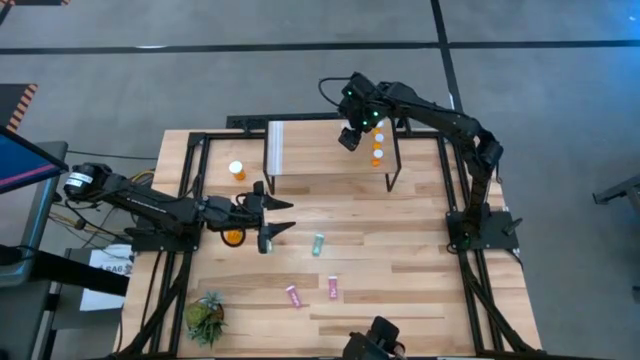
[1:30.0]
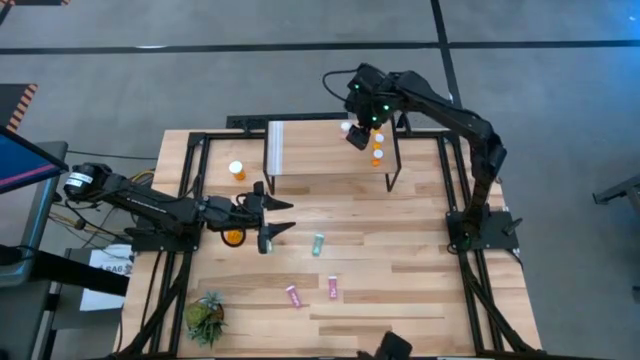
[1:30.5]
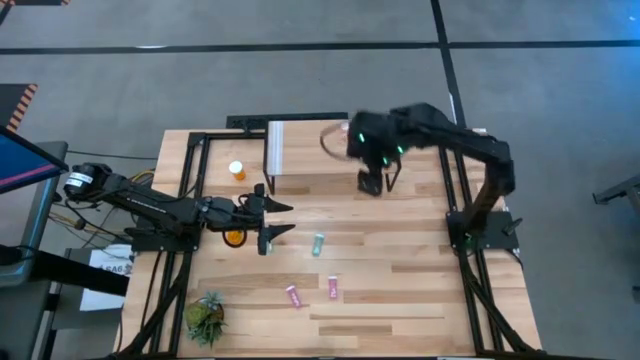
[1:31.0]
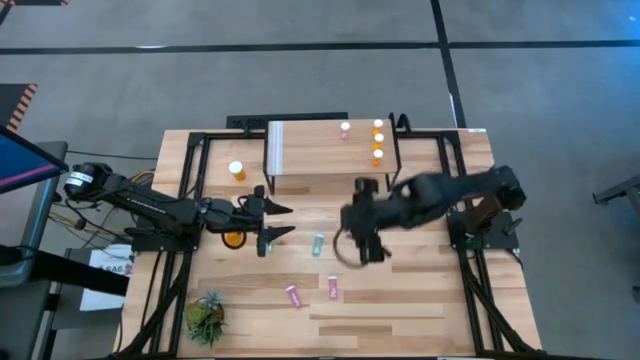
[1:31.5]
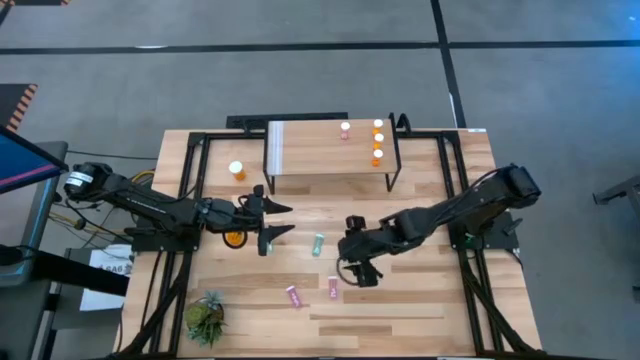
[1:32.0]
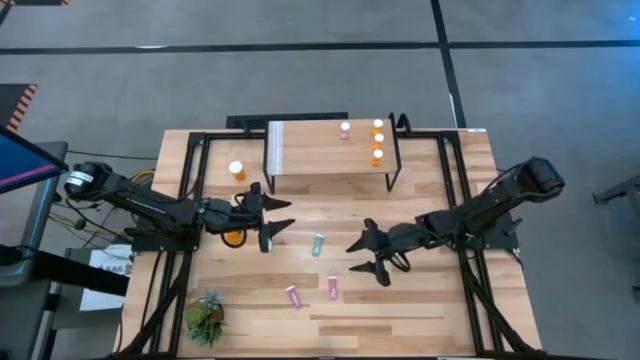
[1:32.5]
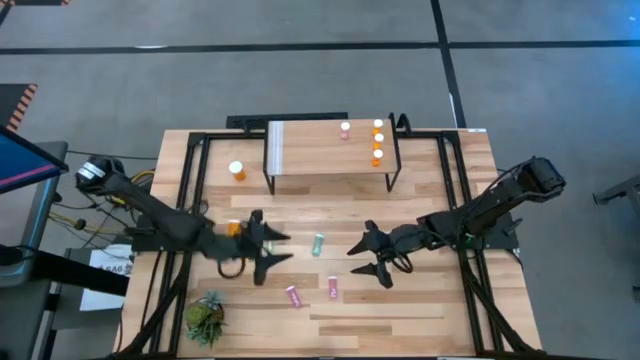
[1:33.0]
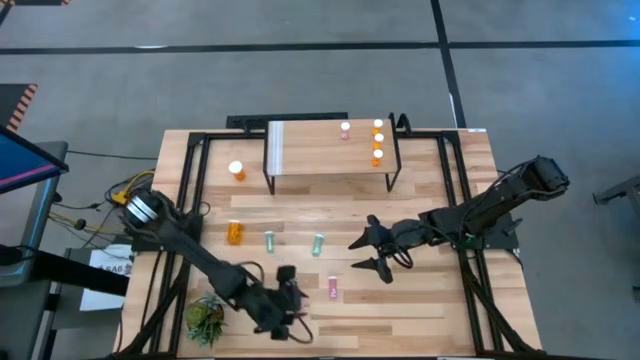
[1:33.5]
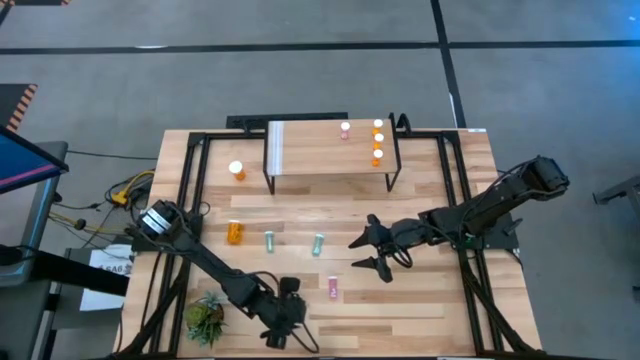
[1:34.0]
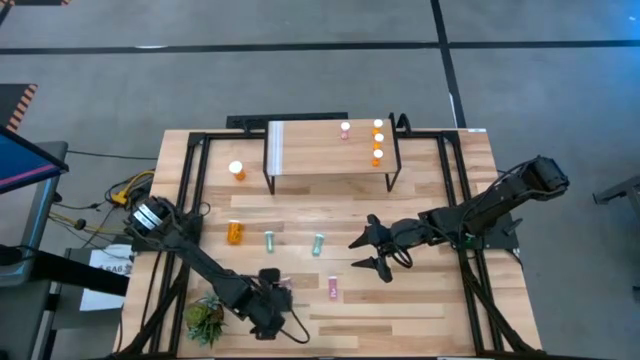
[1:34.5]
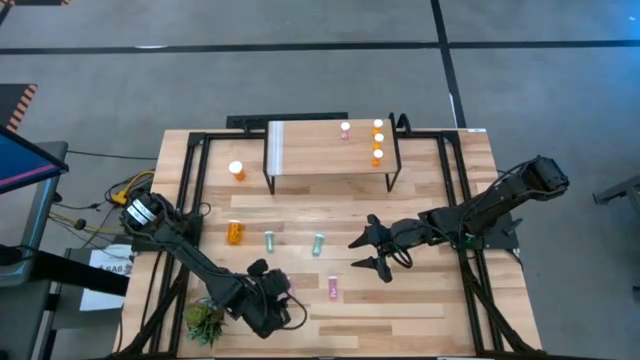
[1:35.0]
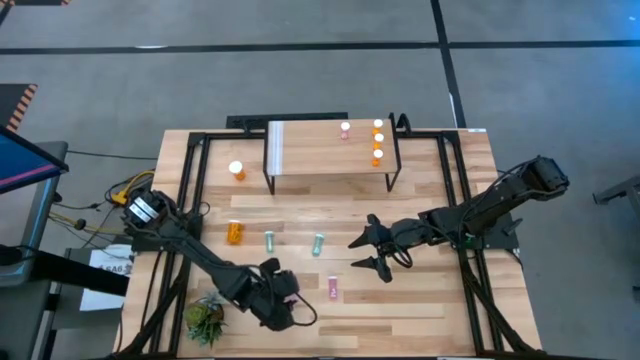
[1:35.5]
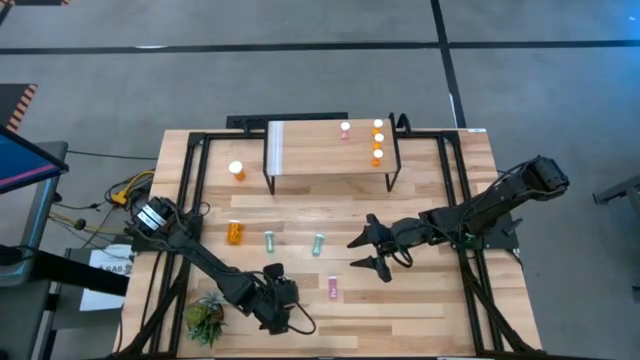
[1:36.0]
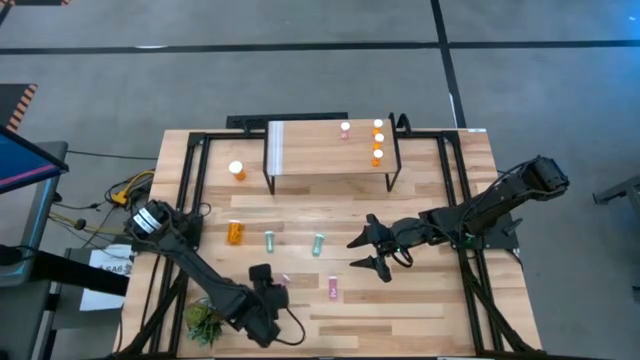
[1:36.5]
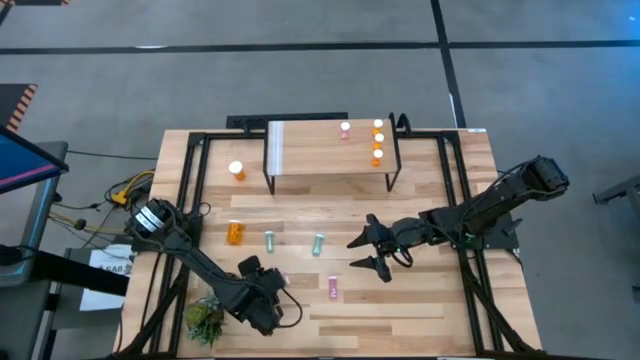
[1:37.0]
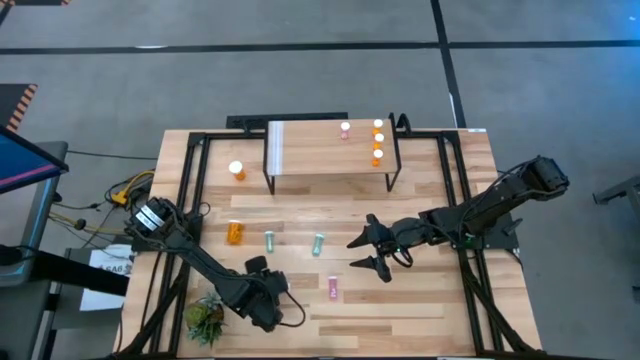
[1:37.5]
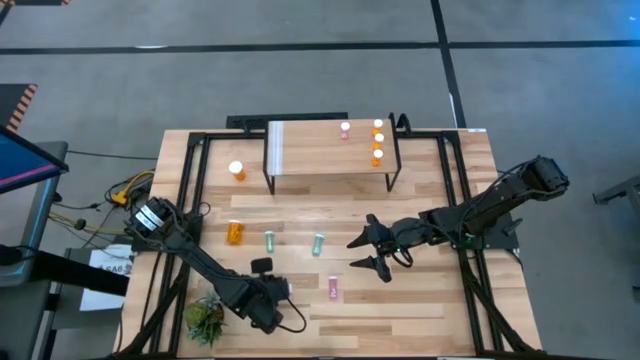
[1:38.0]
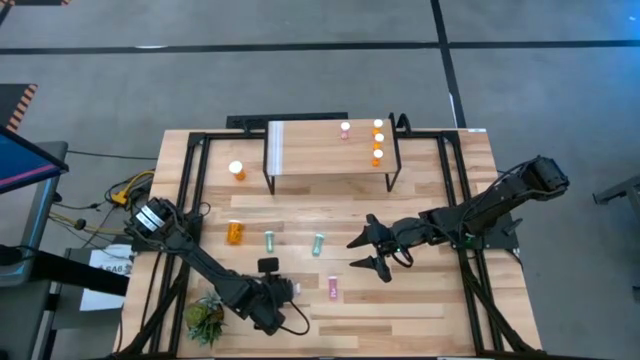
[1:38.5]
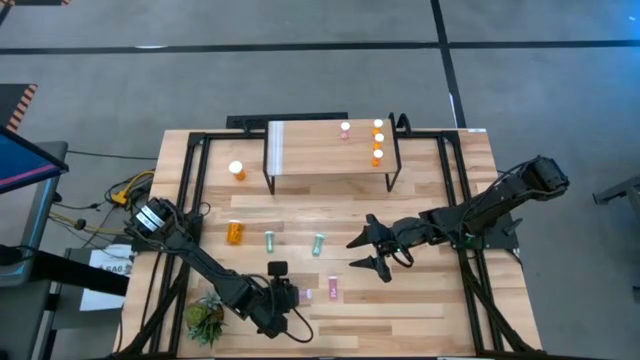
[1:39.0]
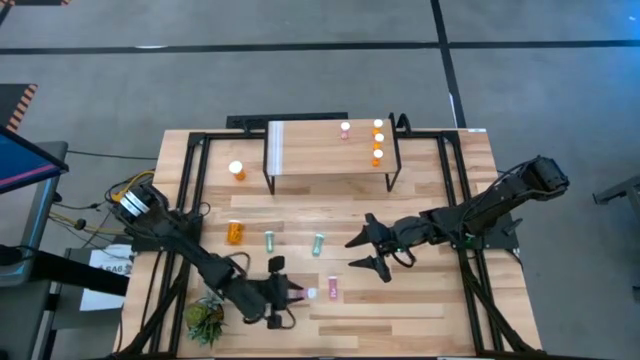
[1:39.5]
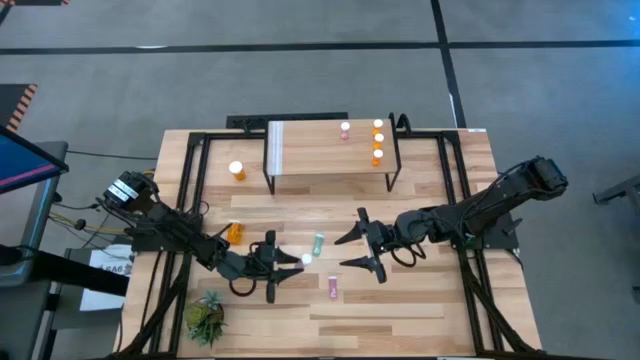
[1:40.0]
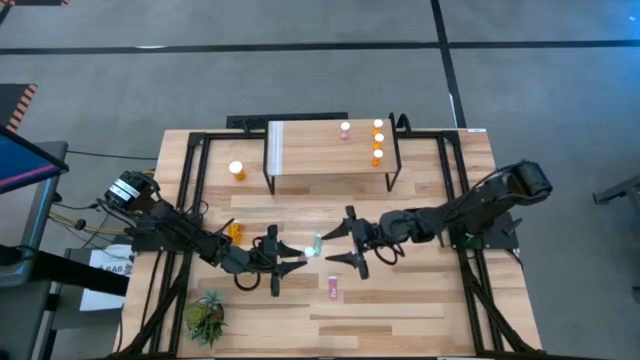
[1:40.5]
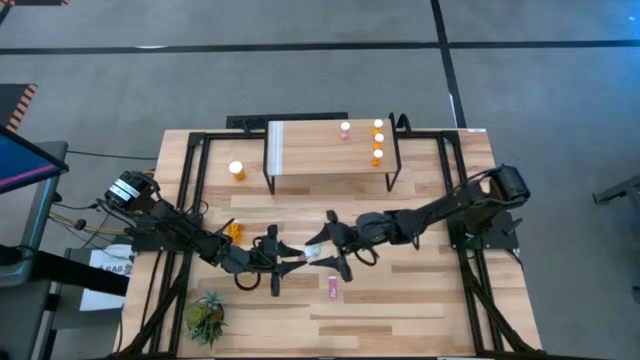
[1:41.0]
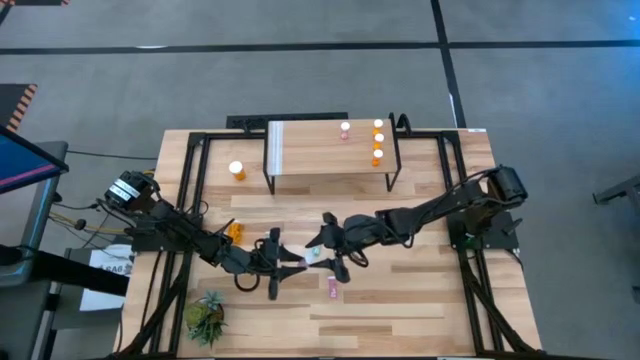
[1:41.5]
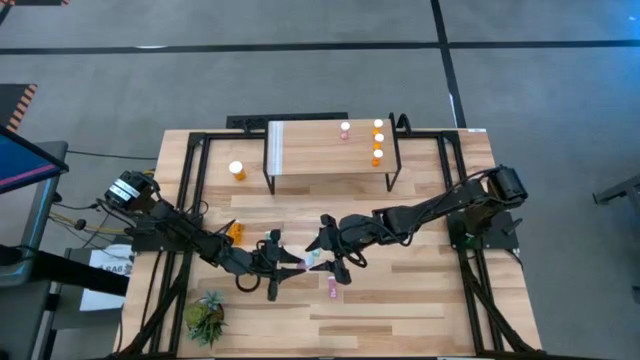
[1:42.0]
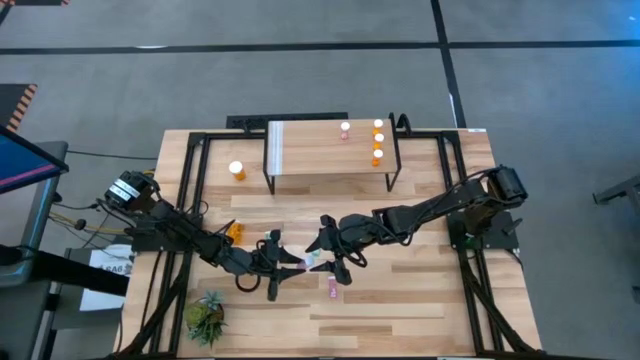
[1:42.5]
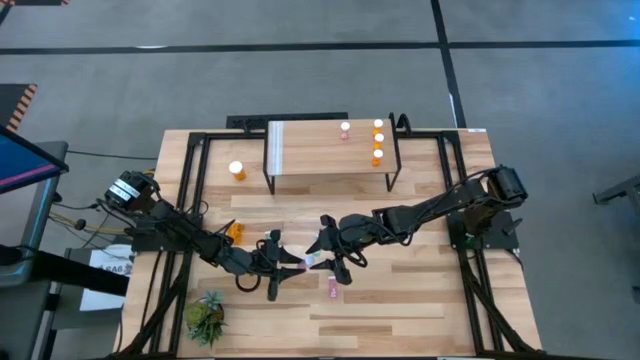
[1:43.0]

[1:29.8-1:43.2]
Task: Pick and place medicine bottles onto shelf by color
Put the left pink pill bottle on the shelf aligned with the other pink pill bottle

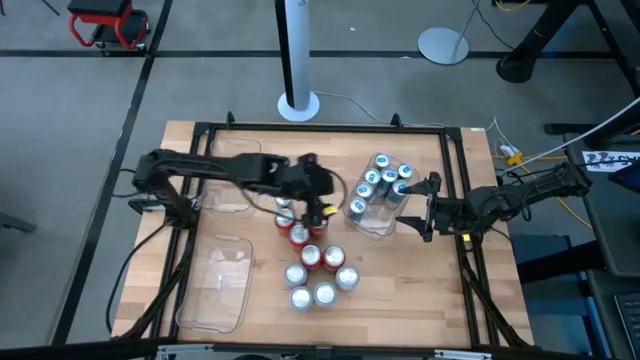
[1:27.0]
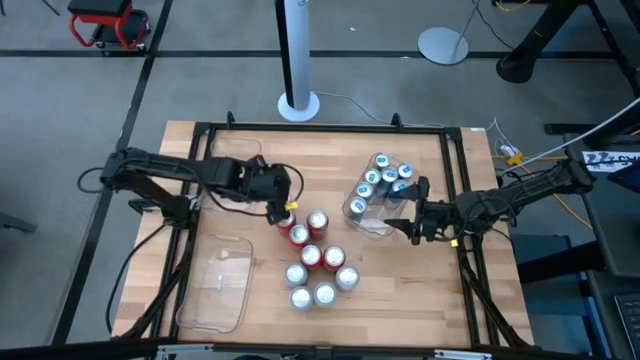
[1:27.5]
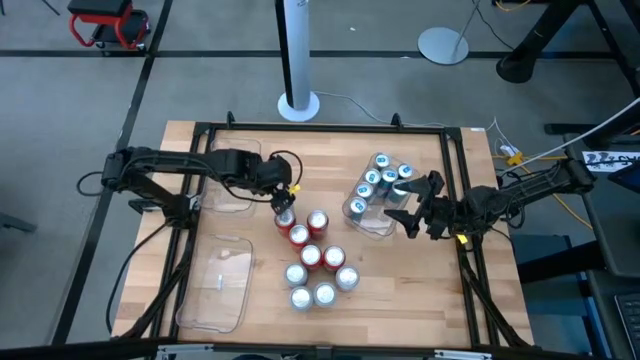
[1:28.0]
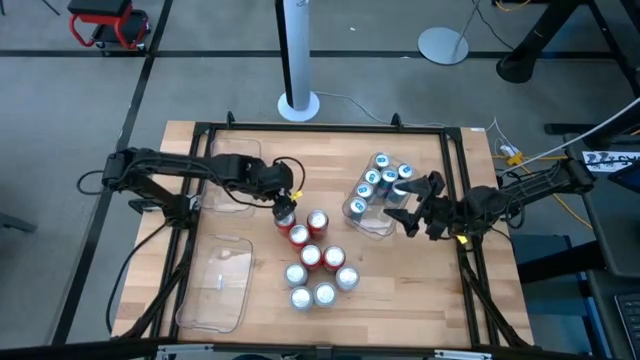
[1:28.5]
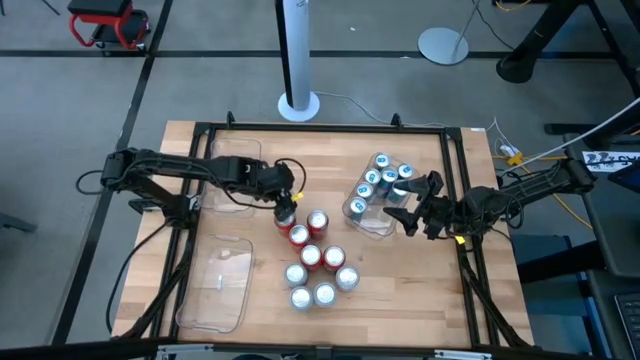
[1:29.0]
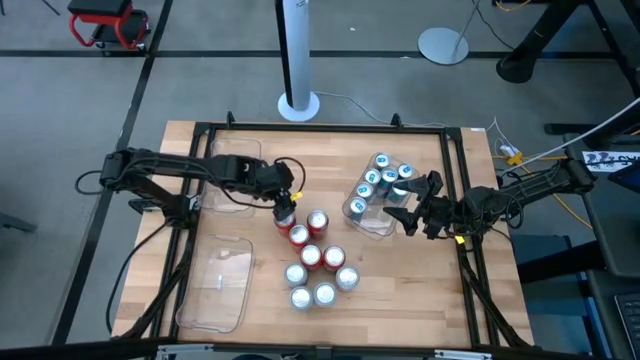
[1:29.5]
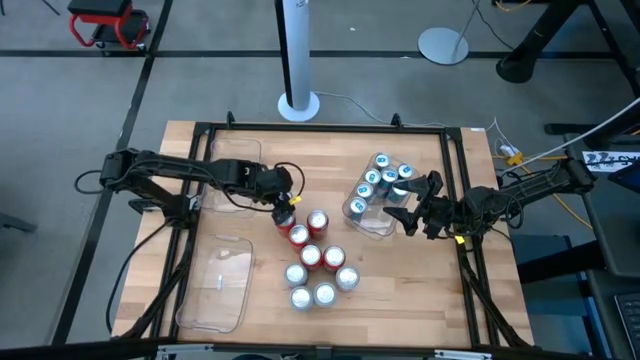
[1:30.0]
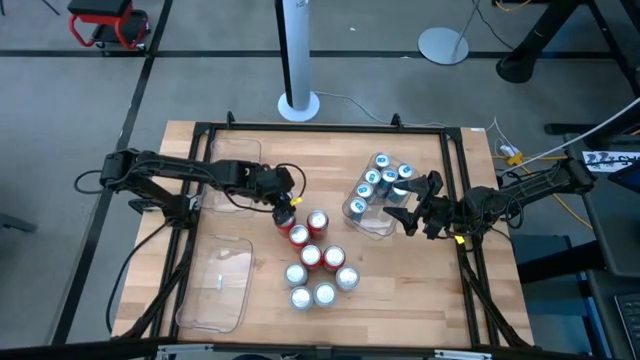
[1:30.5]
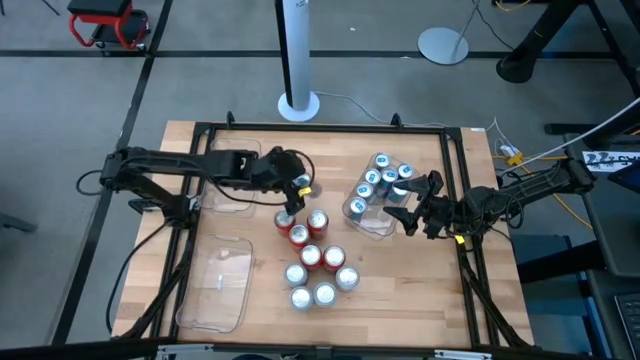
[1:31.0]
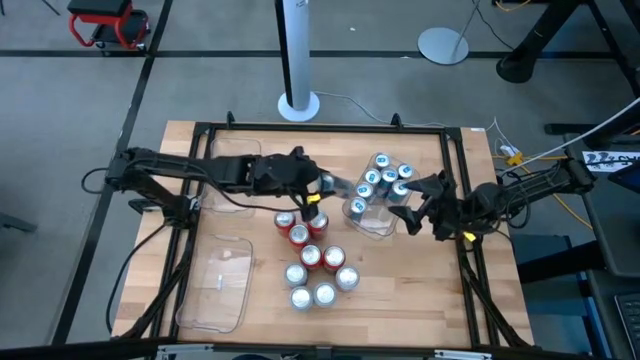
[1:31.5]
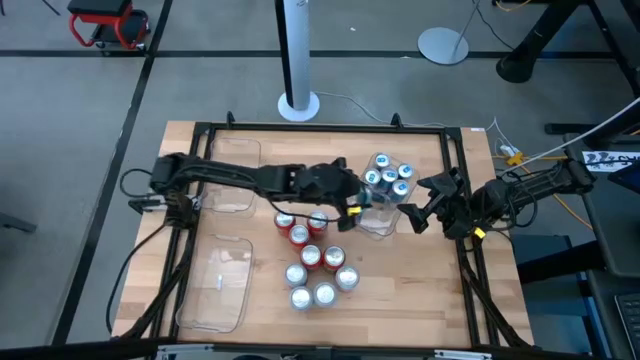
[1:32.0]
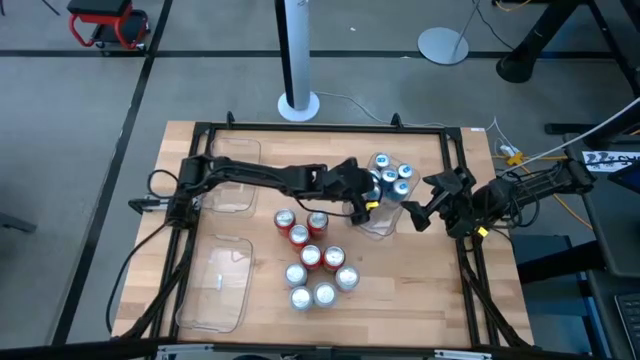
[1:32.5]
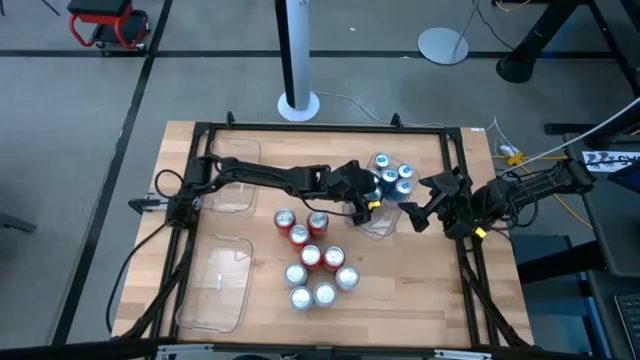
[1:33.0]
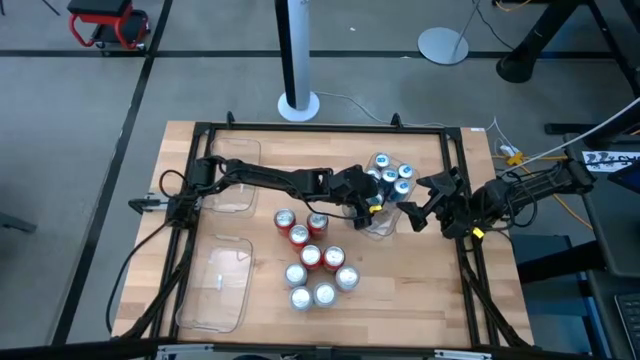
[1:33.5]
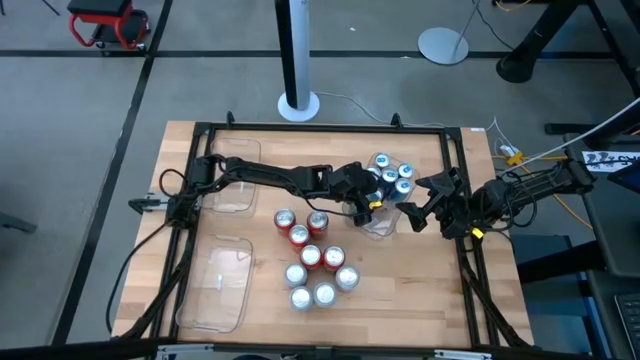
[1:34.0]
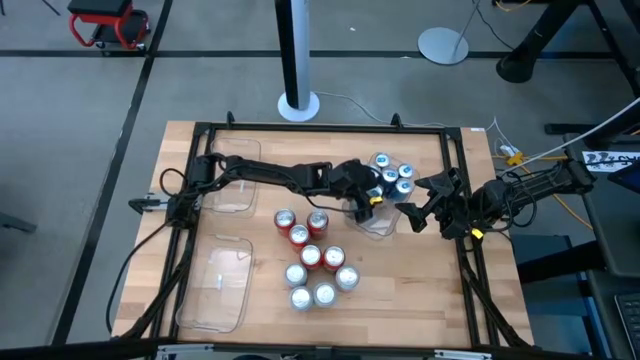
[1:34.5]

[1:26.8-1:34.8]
Task: Sort soda cans
Put the blue soda can in the middle right transparent bin
